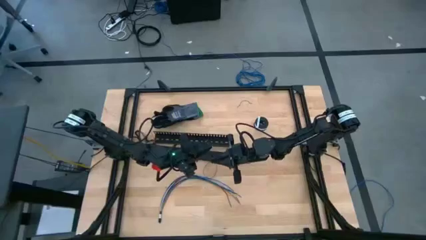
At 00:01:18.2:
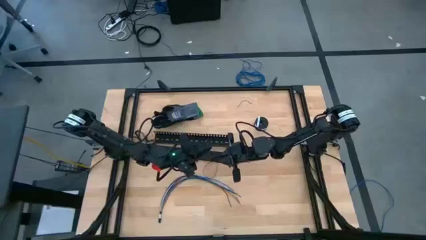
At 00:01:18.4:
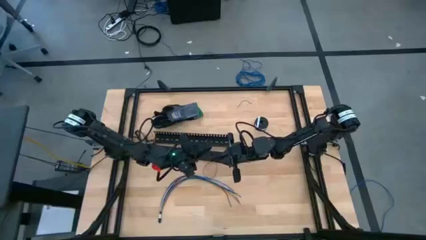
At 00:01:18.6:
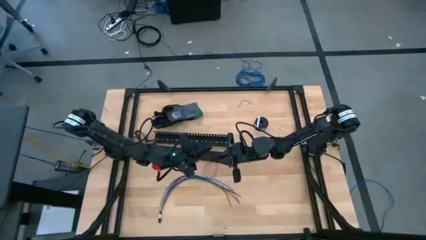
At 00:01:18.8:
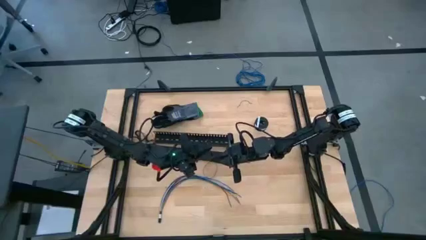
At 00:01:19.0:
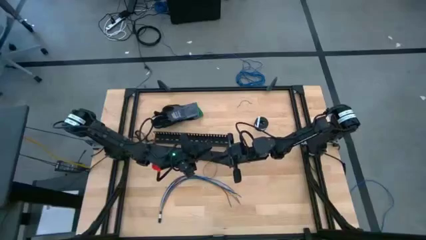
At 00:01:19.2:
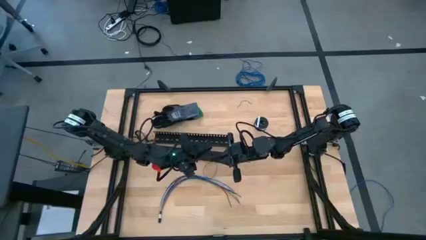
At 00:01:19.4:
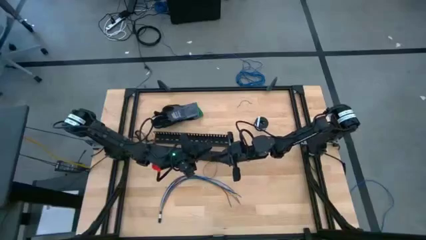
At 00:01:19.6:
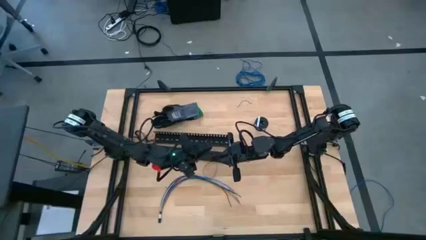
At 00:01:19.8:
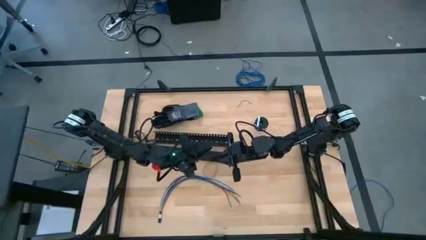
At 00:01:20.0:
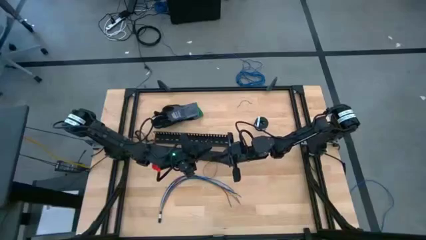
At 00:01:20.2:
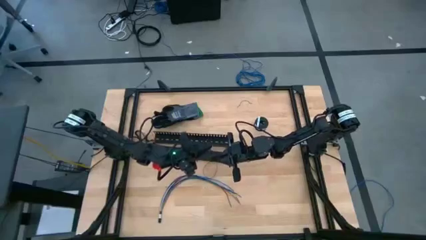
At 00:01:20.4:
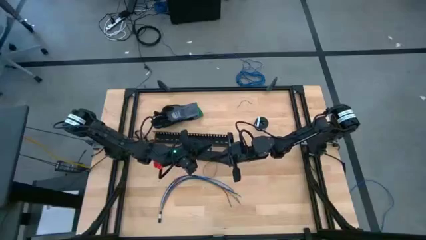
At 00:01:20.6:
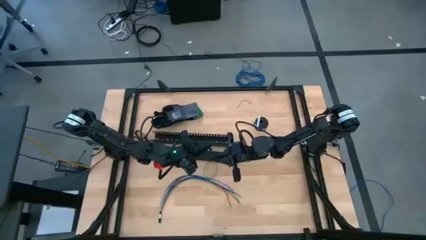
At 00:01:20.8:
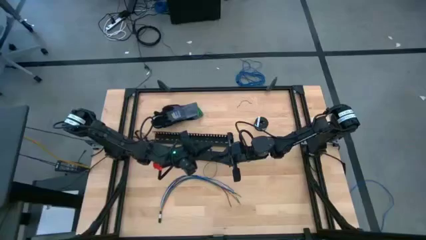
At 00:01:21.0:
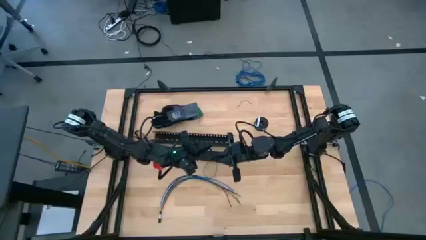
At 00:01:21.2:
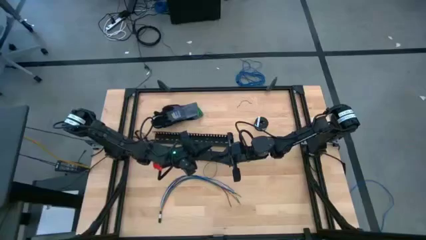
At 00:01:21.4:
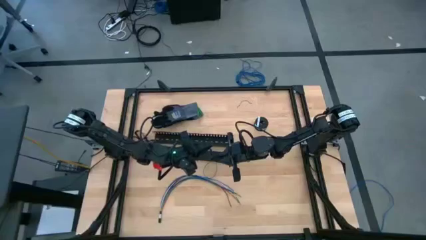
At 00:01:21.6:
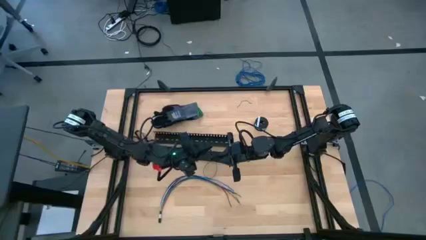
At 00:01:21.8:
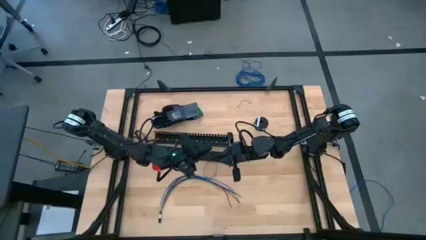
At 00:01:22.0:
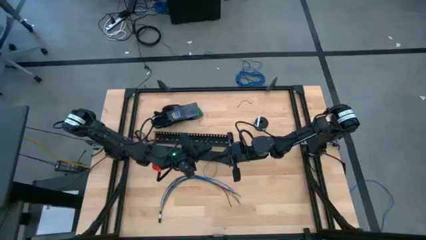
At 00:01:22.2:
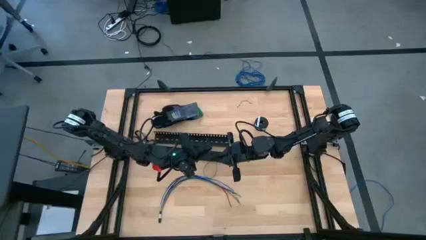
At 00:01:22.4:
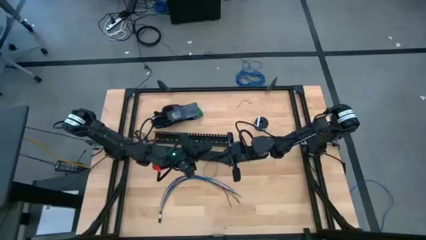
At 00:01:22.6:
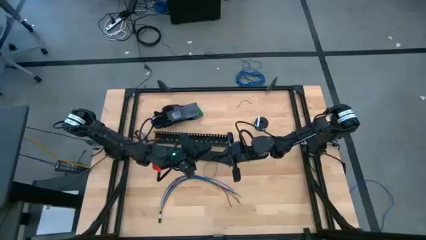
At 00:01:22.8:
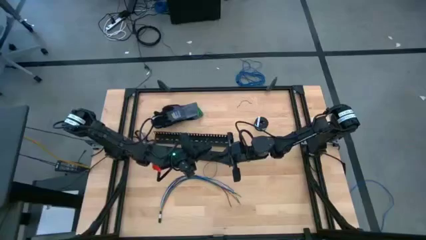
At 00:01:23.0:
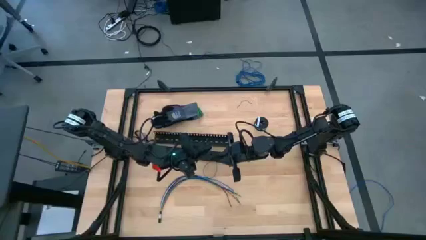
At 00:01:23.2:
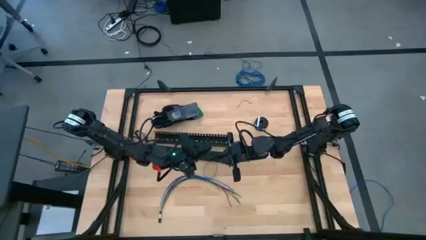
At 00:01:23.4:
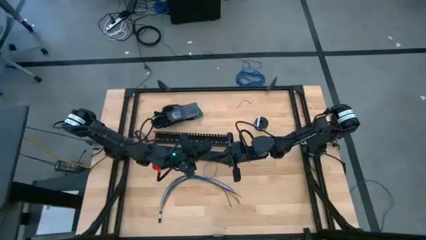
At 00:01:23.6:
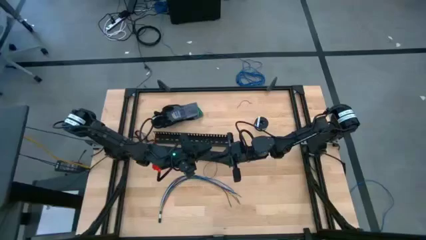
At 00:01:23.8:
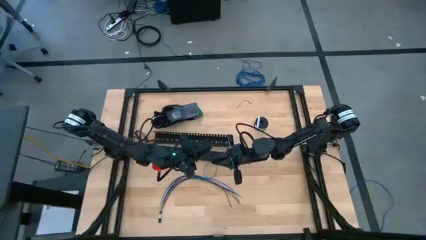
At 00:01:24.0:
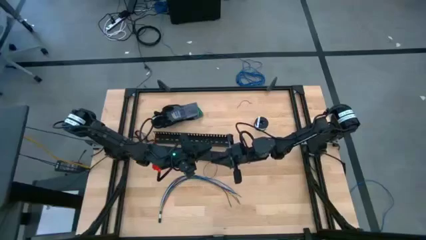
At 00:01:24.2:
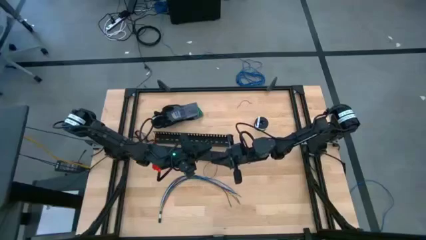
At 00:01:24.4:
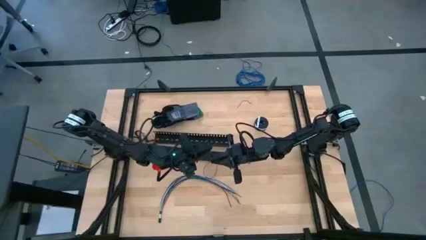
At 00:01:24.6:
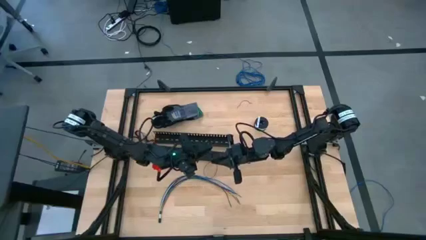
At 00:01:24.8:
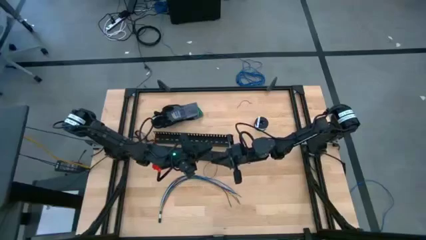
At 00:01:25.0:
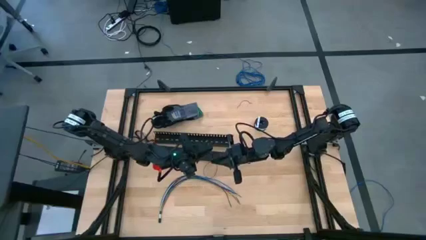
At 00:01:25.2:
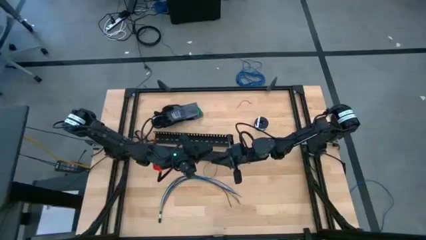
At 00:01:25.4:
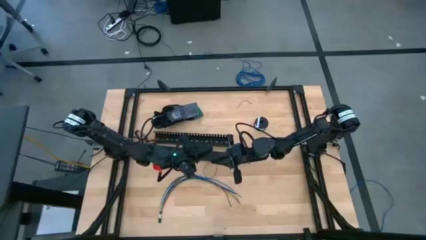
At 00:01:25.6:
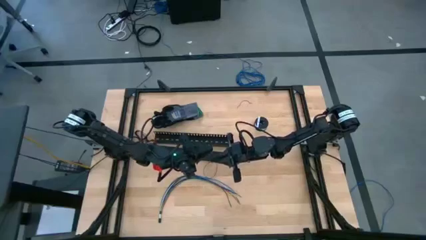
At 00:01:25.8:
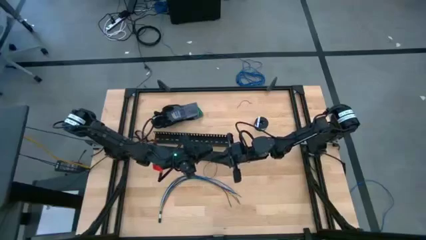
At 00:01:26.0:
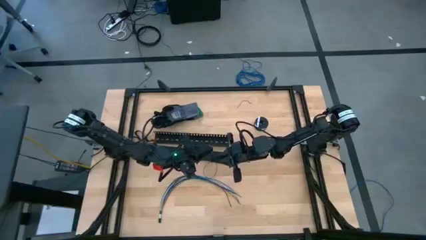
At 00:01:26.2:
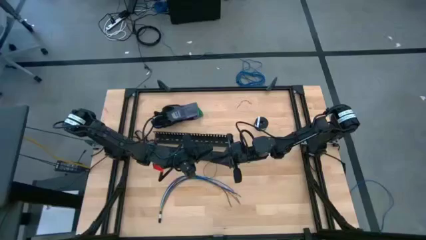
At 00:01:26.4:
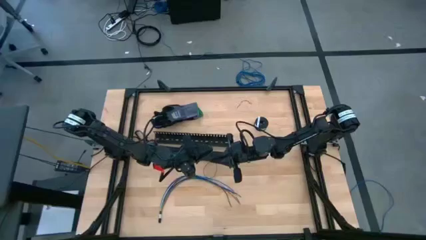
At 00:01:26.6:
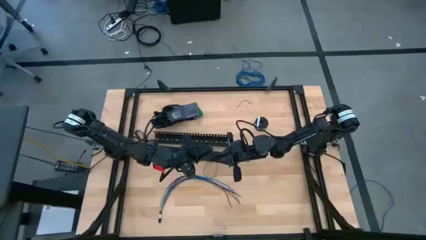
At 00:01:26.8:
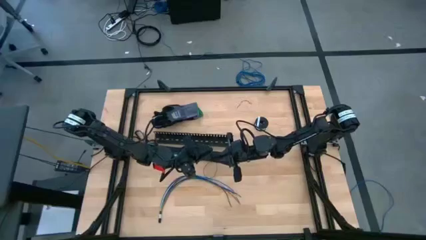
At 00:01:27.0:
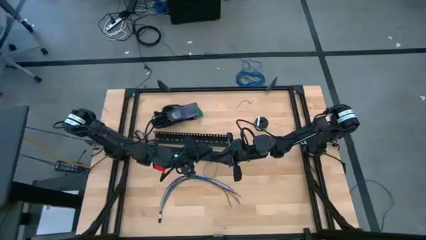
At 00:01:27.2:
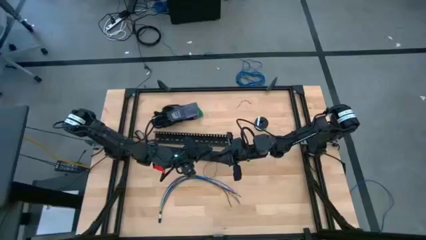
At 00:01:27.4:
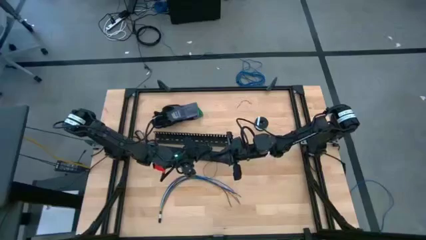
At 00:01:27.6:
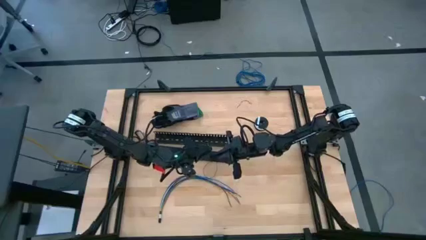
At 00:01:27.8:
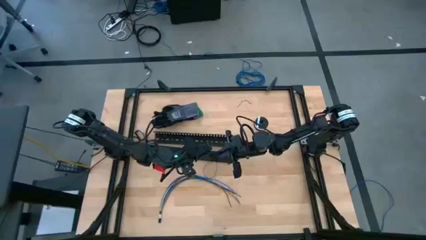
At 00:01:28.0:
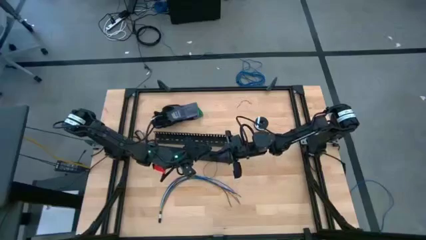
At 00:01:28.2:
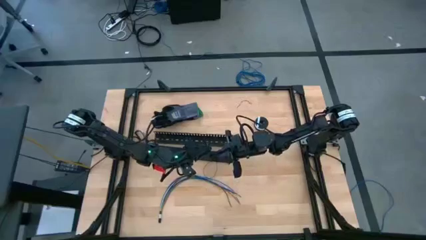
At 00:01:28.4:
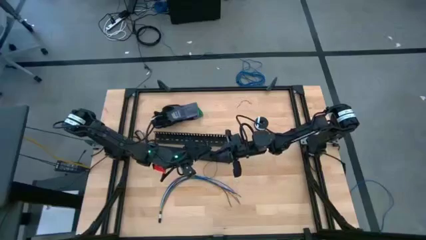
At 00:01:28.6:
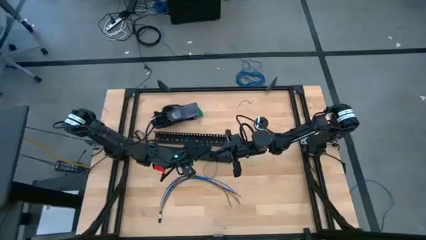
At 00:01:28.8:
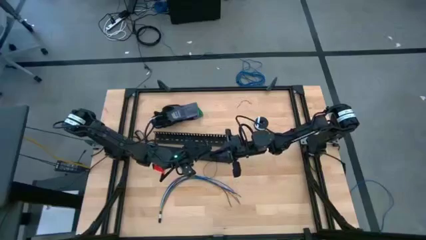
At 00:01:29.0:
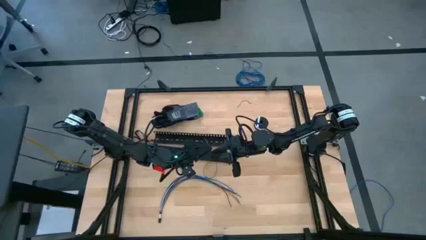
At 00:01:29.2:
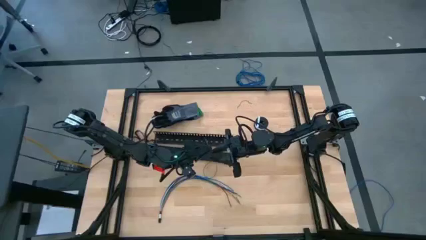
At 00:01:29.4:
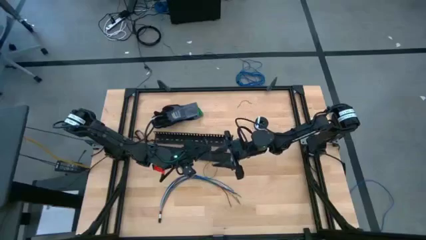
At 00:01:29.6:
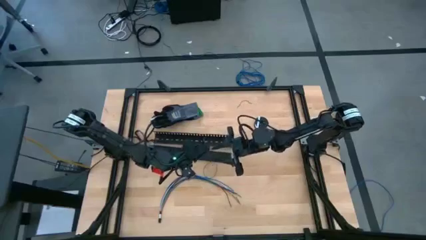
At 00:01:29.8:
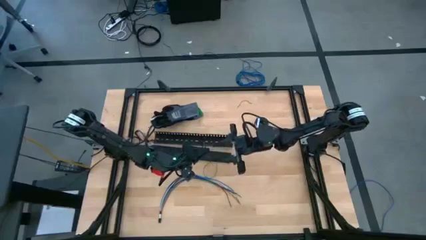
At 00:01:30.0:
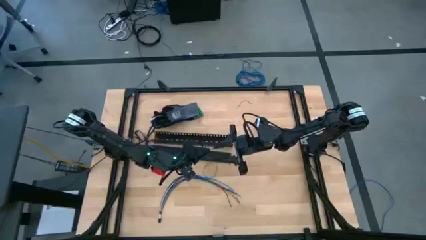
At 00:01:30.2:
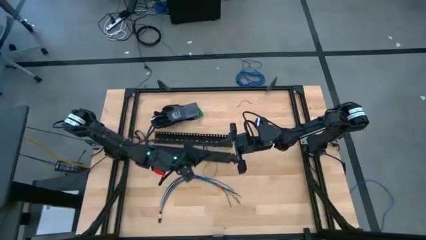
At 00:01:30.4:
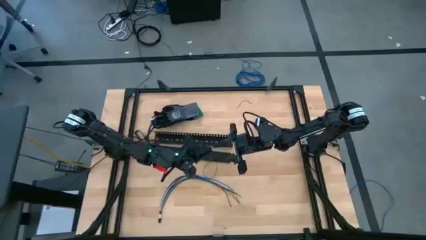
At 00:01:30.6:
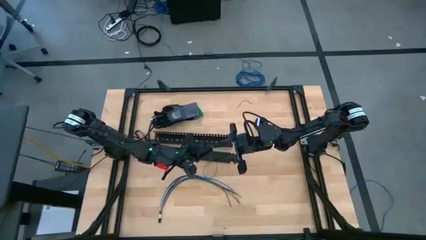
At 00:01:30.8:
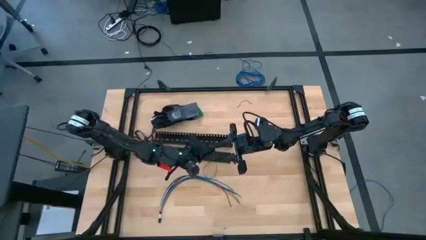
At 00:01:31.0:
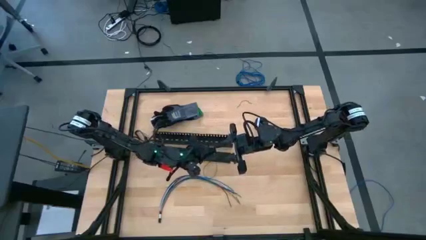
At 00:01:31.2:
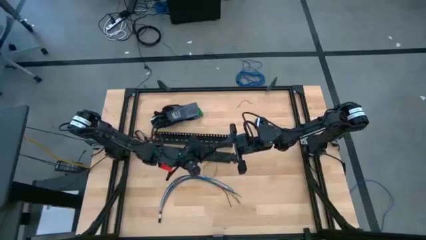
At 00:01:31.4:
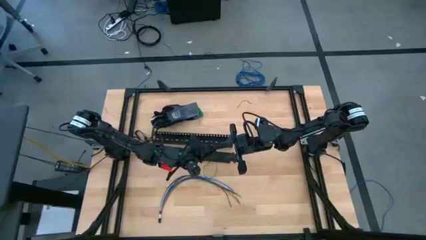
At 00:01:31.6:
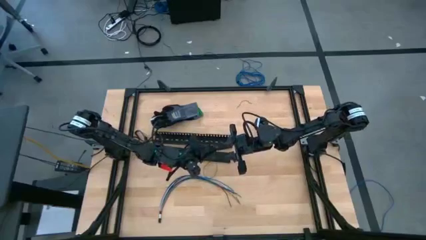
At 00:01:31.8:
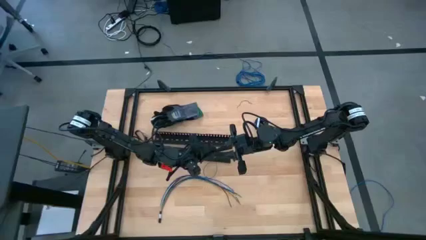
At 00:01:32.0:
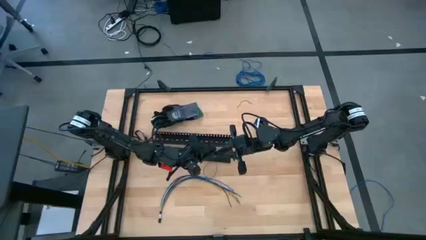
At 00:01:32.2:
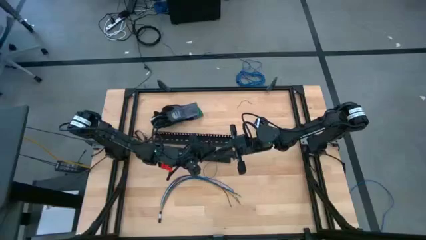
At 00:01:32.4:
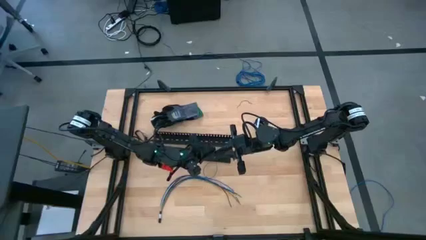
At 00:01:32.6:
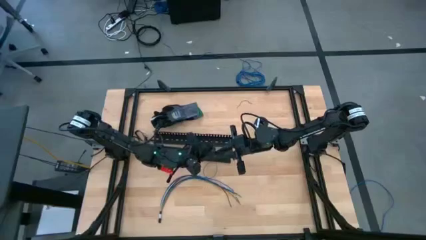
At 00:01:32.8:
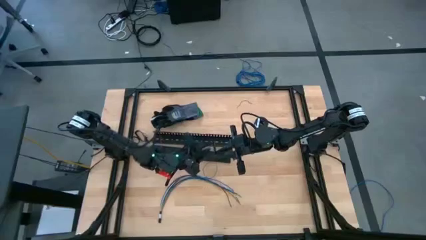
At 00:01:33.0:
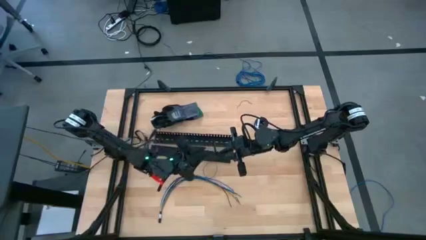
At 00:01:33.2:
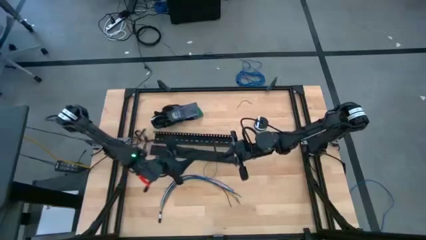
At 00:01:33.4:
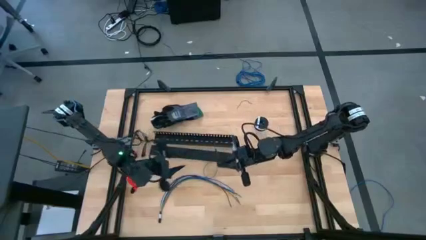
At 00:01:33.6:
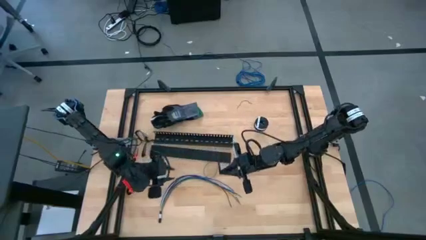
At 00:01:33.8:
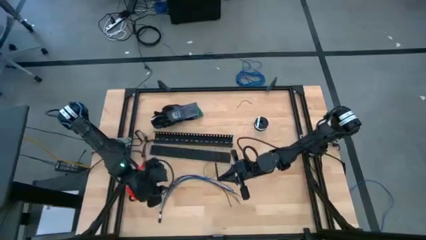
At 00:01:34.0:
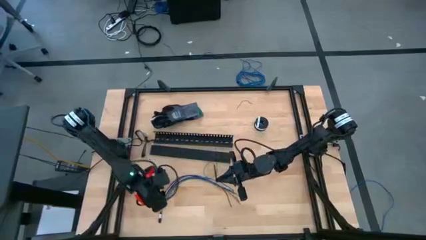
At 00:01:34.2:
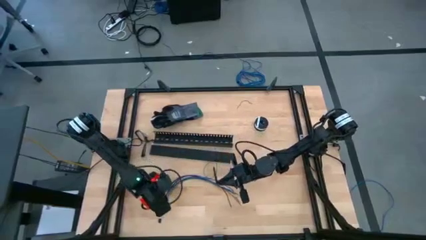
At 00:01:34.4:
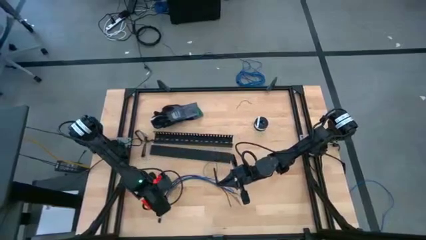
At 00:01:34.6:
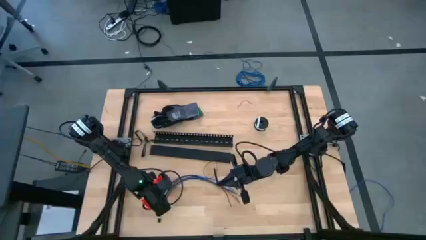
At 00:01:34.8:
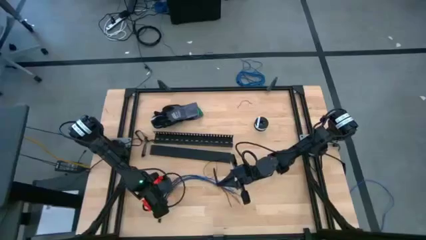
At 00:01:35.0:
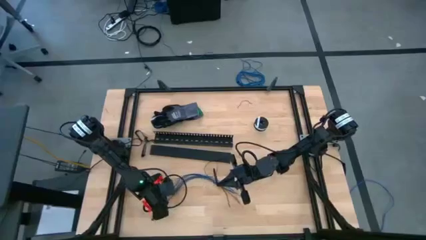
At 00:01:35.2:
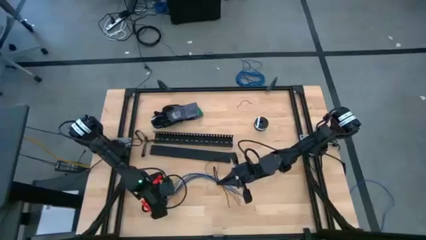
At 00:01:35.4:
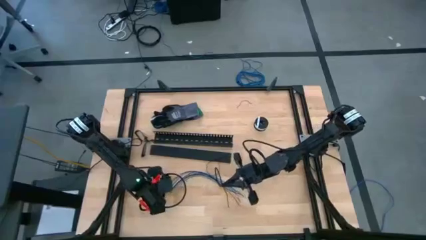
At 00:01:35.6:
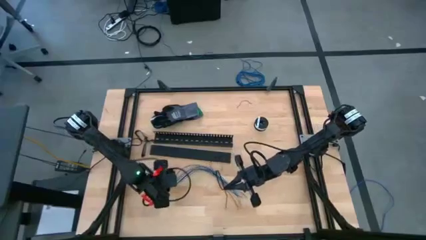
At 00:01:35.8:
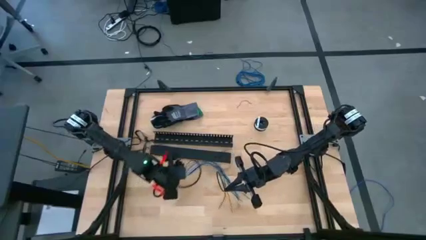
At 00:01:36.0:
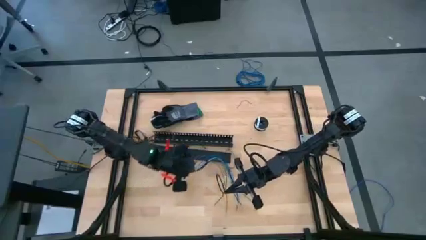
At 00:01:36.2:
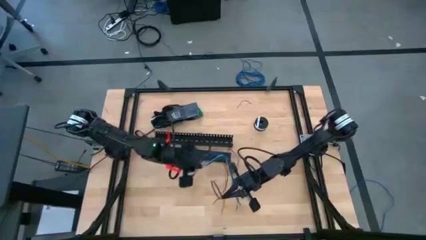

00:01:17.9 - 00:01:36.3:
Task: Ziptie cables
Wrap the right black zip tie on the cables
